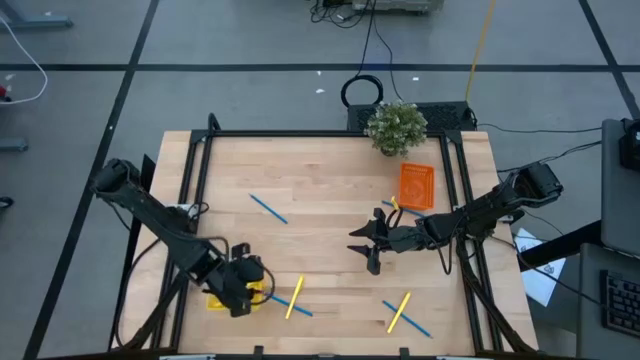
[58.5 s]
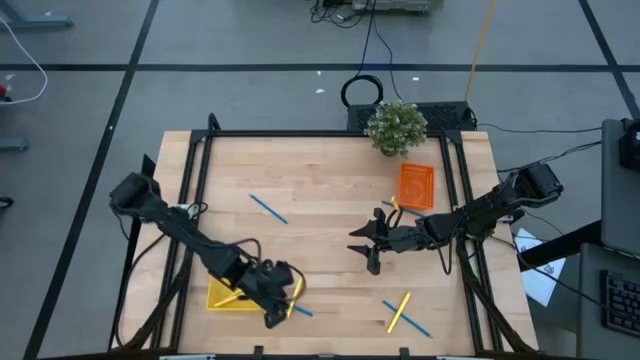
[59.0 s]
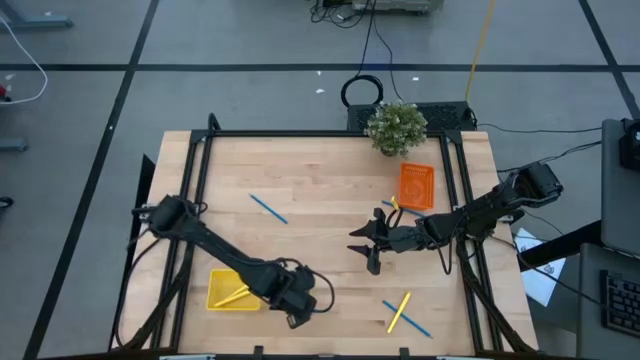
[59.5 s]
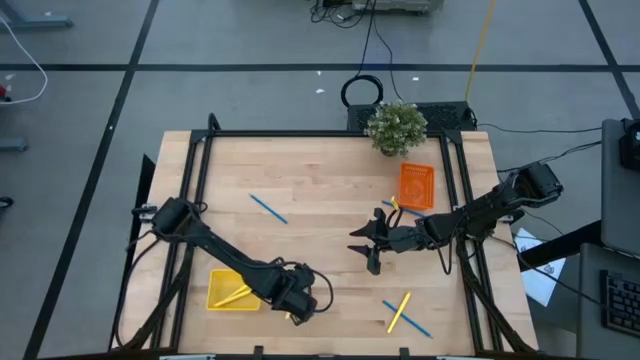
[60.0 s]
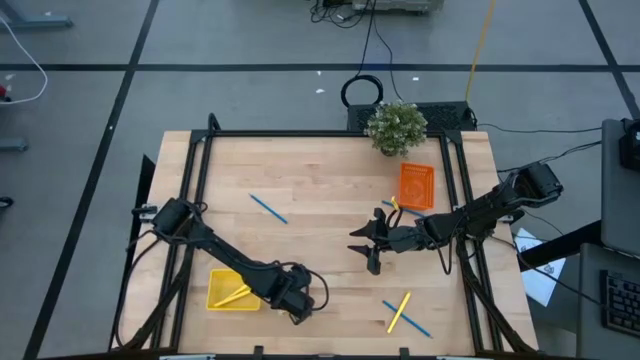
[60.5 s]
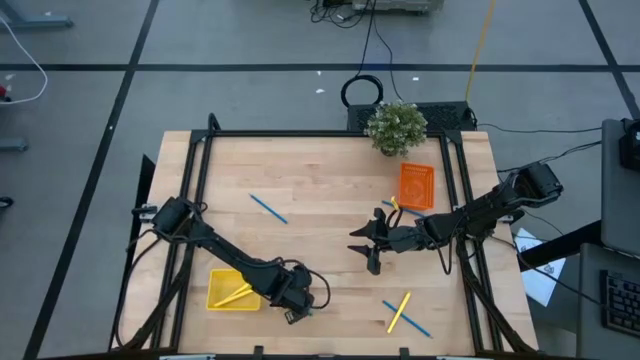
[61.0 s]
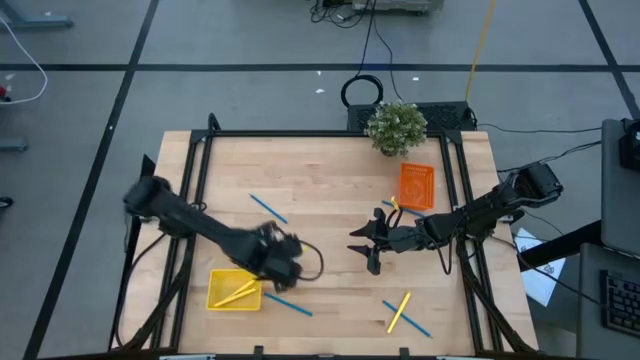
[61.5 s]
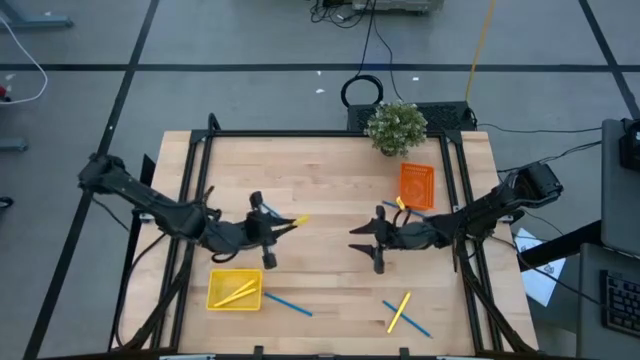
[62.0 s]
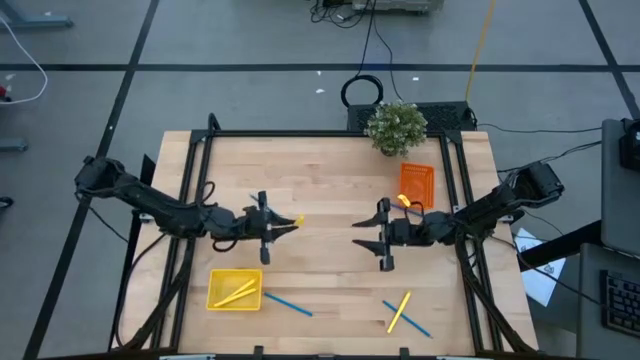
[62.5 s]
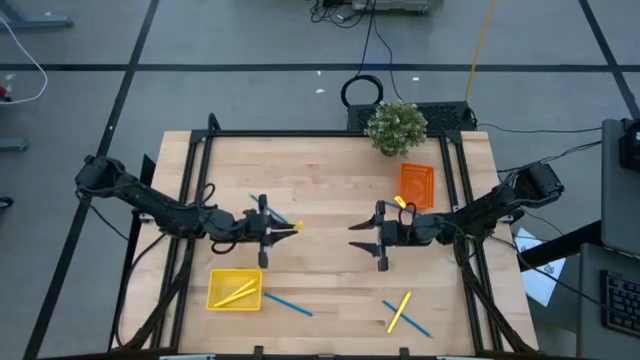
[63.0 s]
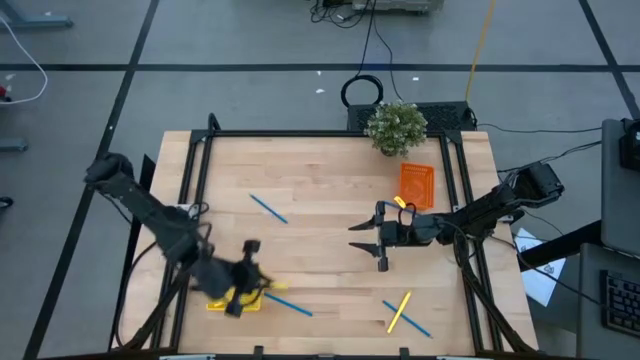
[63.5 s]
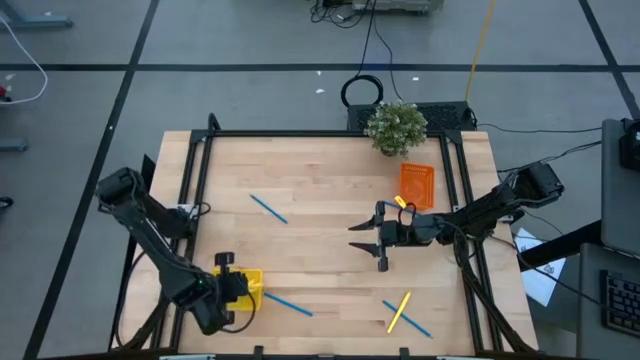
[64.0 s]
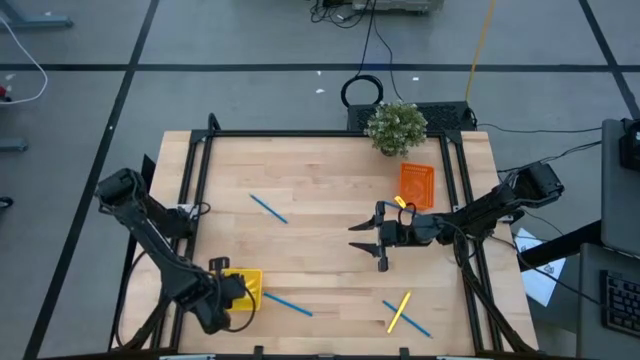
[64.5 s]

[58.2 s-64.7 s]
Task: Sort pens & pencils
Put the left yellow ballpen into the yellow bin

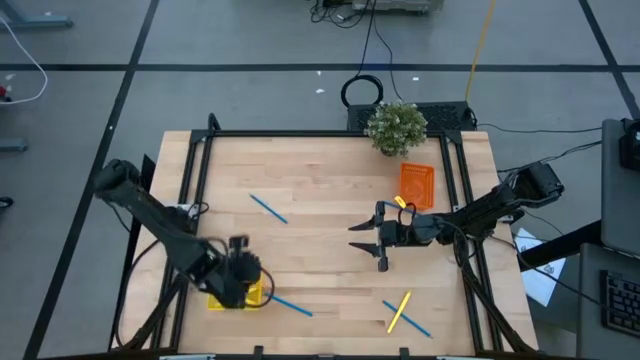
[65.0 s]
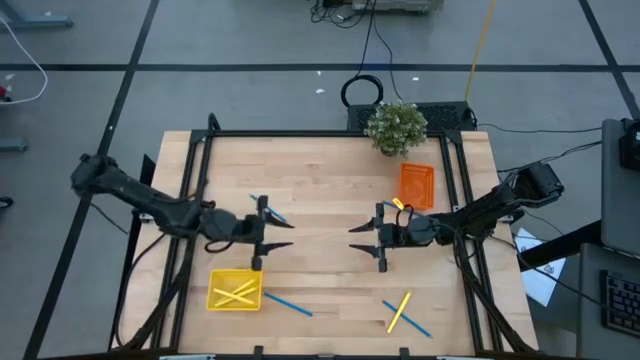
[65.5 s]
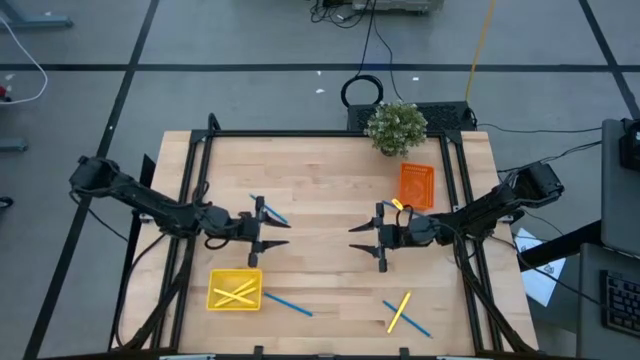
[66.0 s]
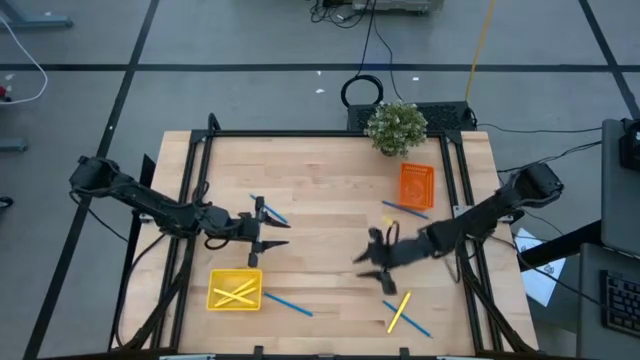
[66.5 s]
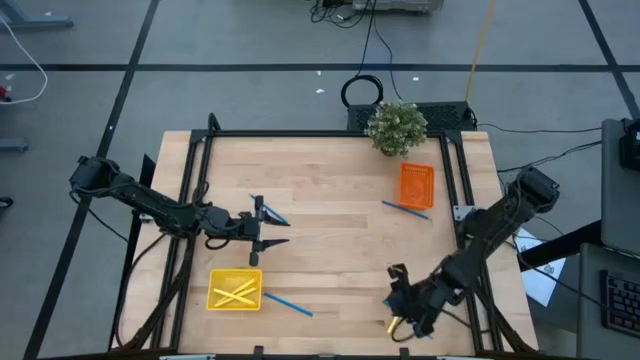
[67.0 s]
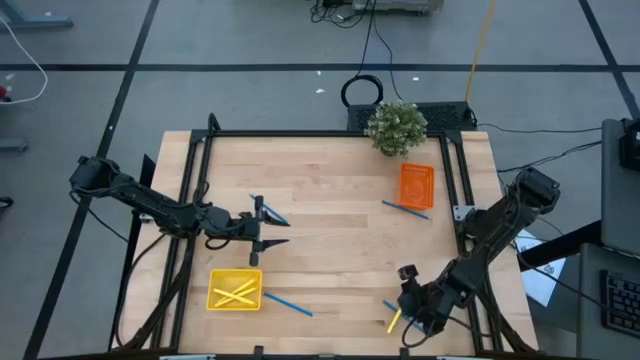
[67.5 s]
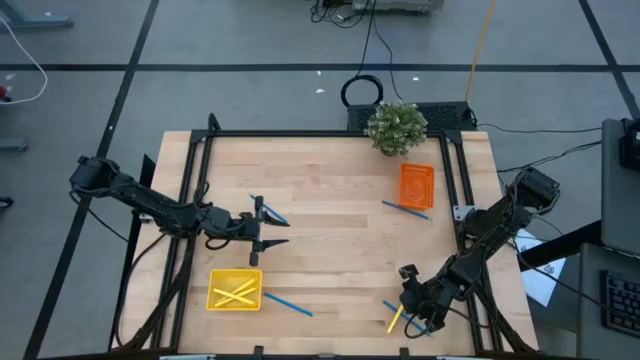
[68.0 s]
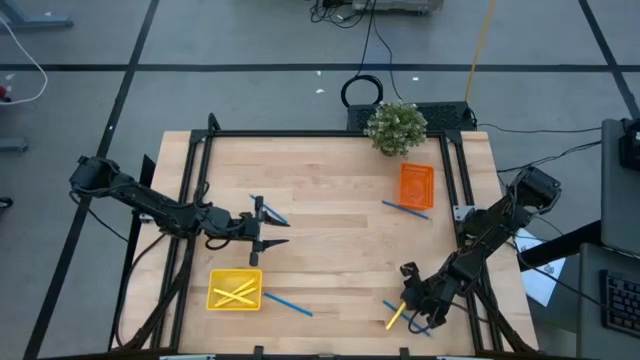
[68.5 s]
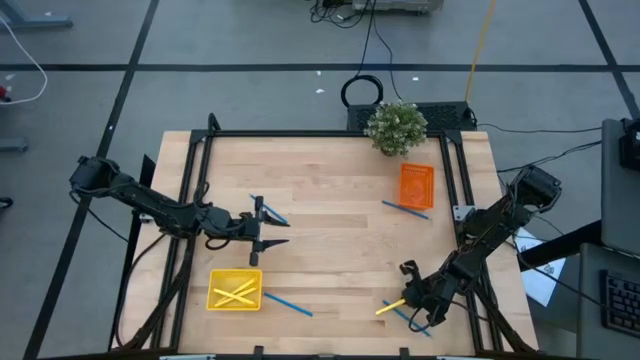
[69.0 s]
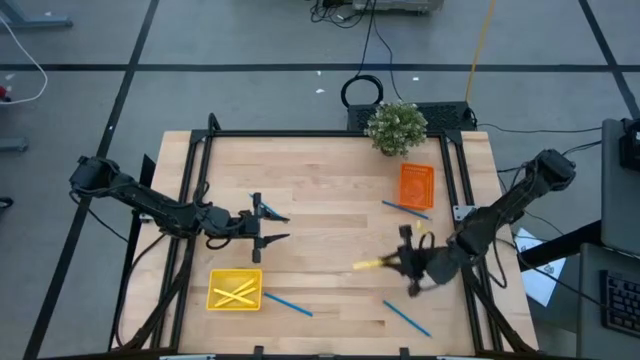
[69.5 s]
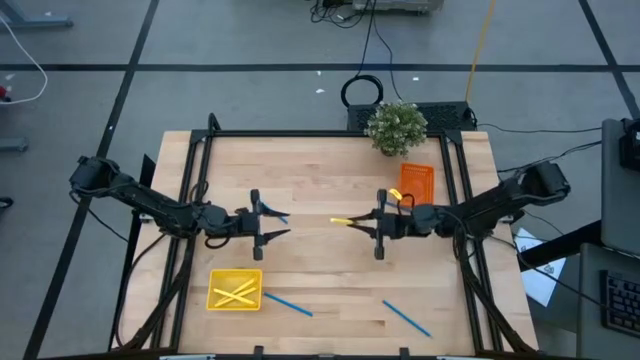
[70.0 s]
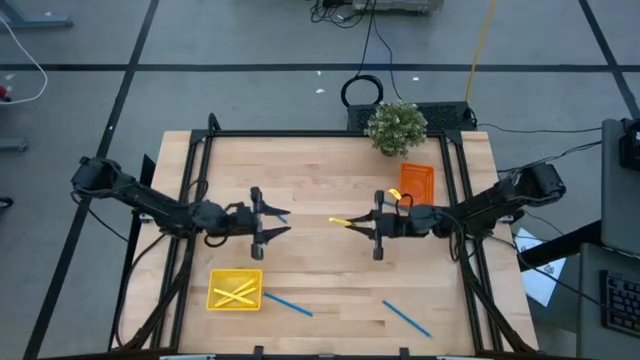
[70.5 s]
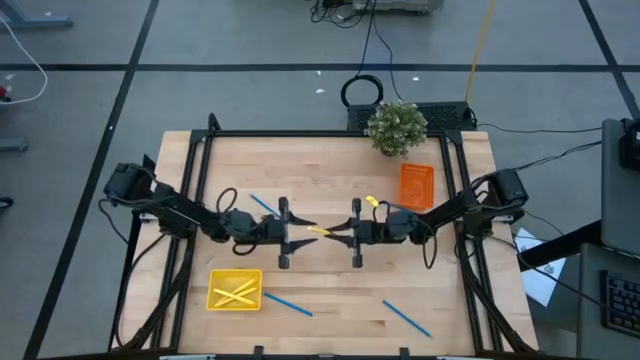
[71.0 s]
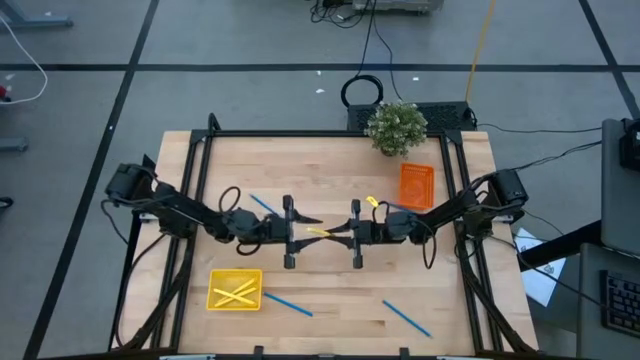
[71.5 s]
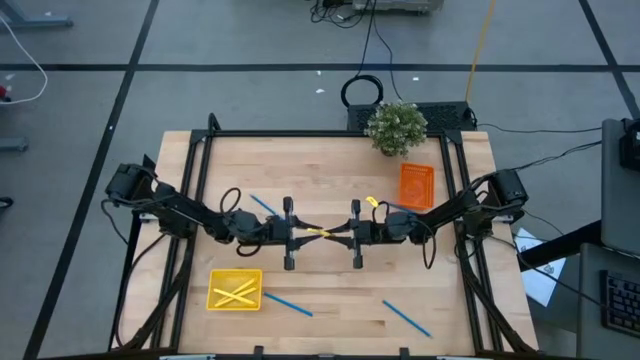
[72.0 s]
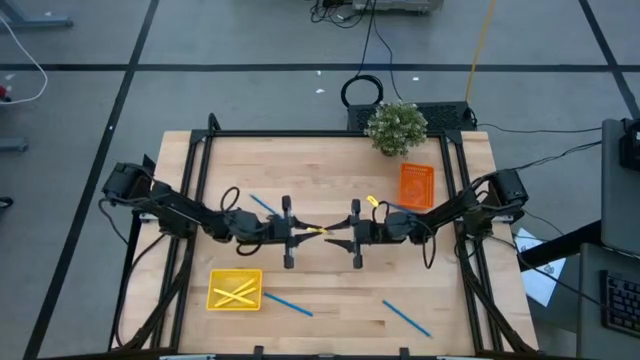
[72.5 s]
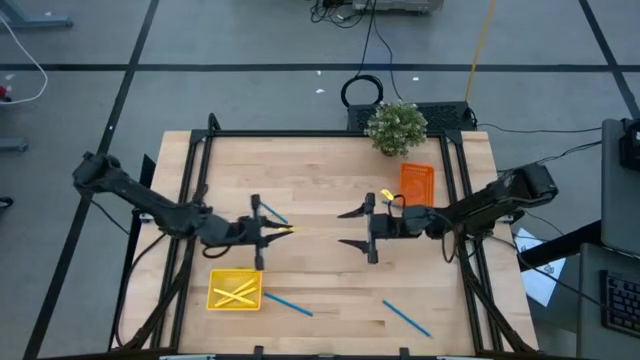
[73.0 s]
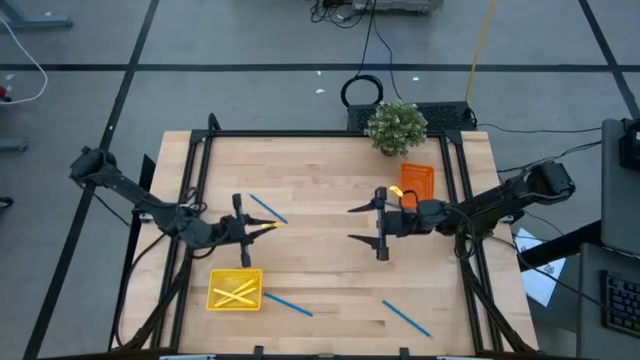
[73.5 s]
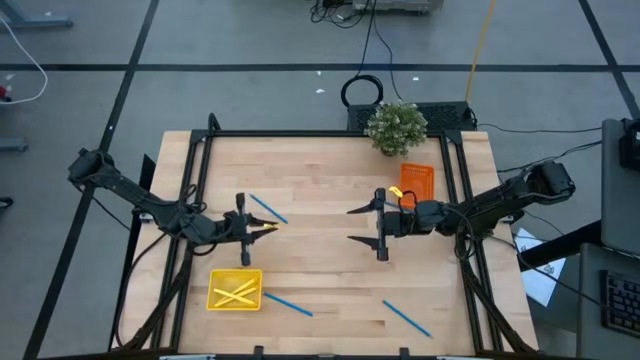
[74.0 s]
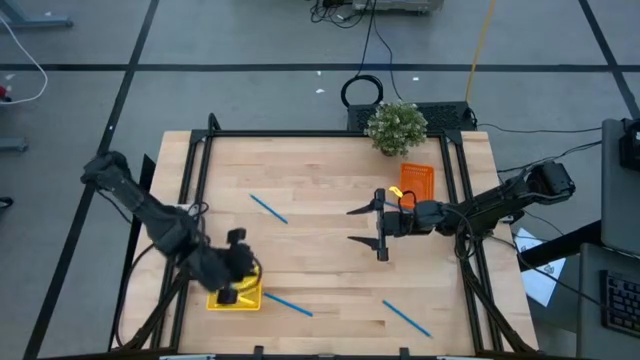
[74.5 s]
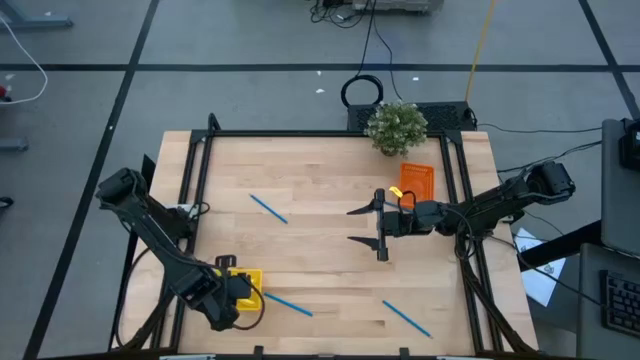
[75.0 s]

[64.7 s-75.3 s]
Put the yellow ballpen into the yellow bin

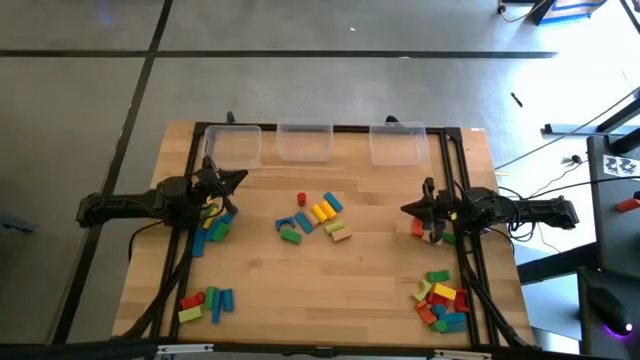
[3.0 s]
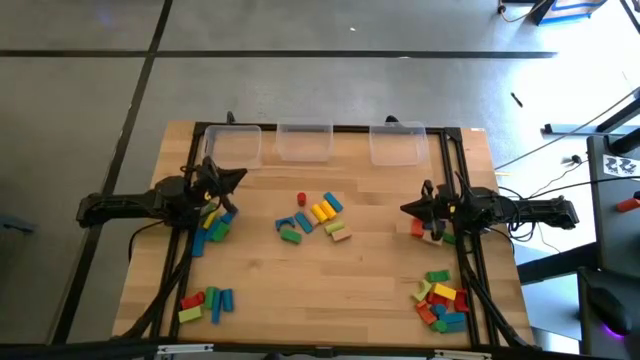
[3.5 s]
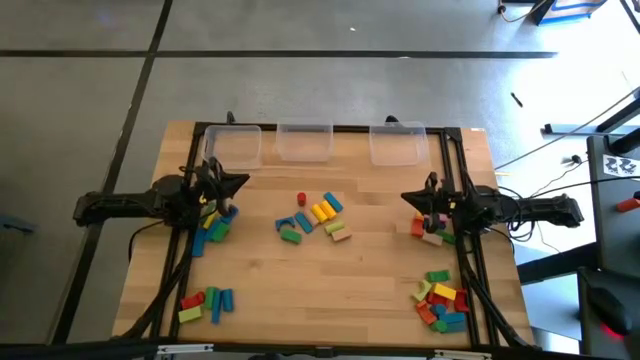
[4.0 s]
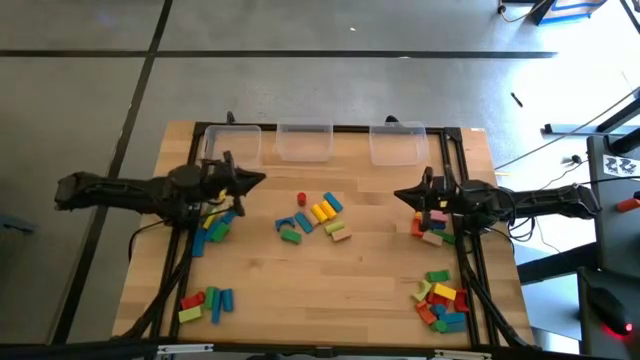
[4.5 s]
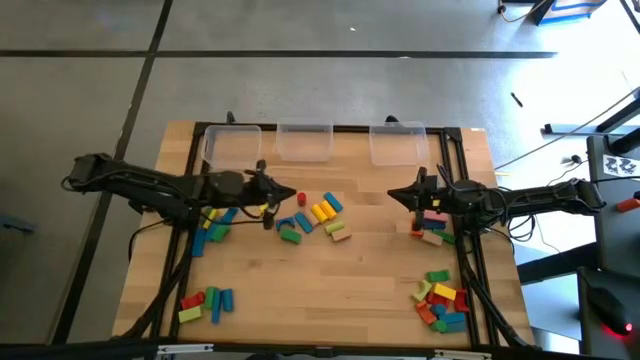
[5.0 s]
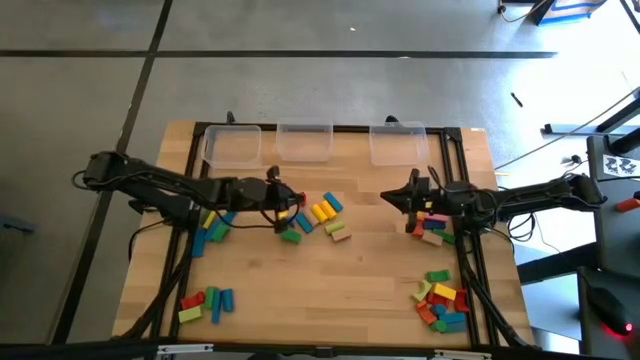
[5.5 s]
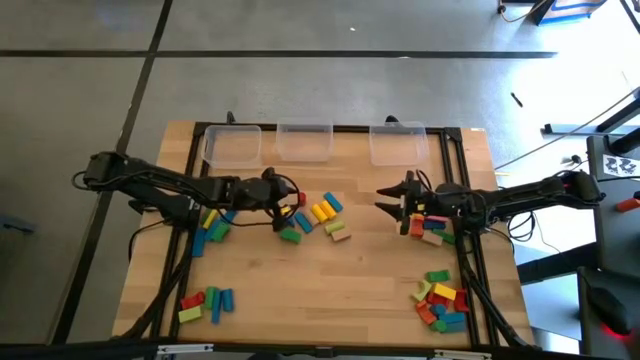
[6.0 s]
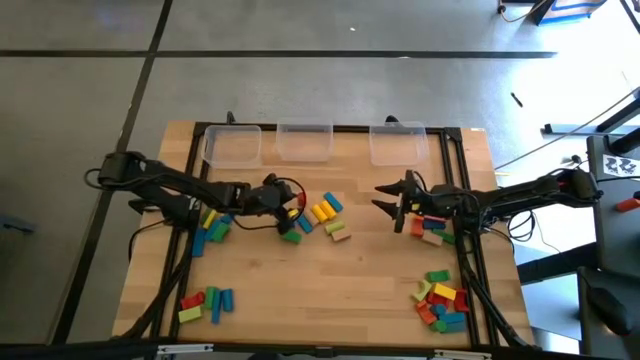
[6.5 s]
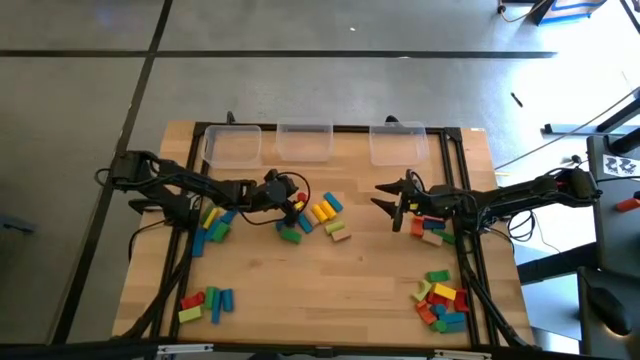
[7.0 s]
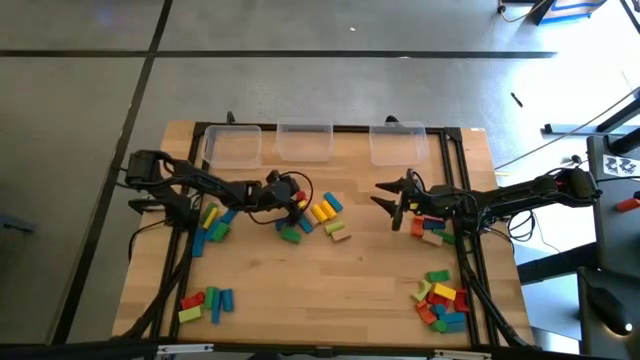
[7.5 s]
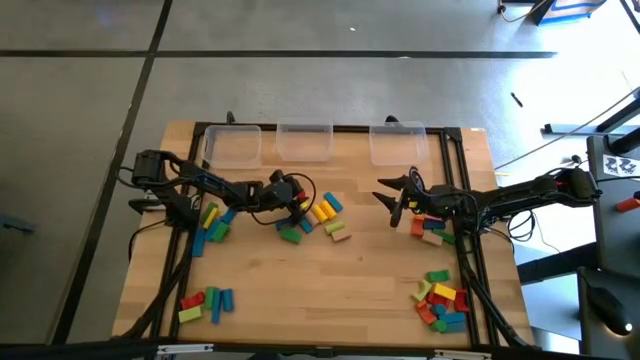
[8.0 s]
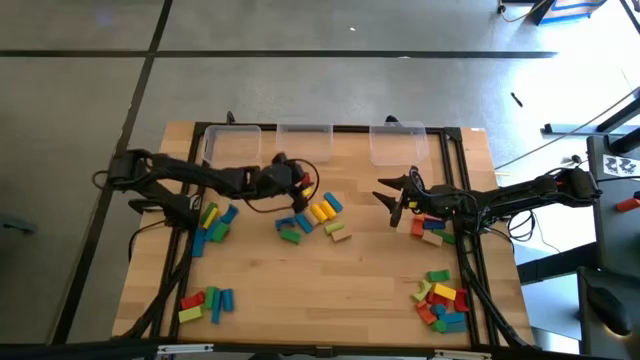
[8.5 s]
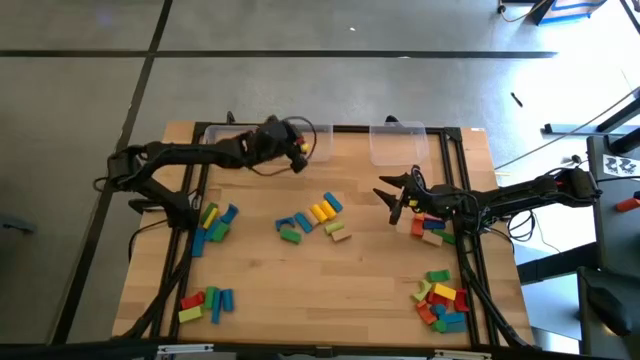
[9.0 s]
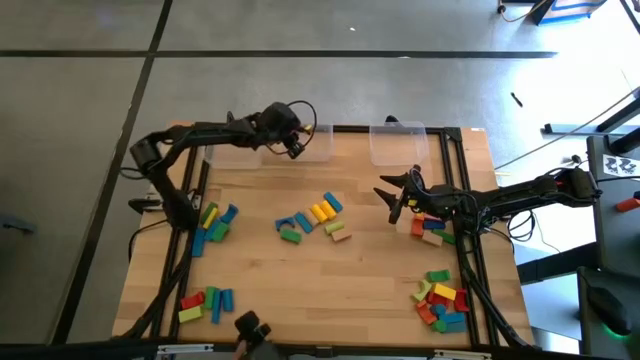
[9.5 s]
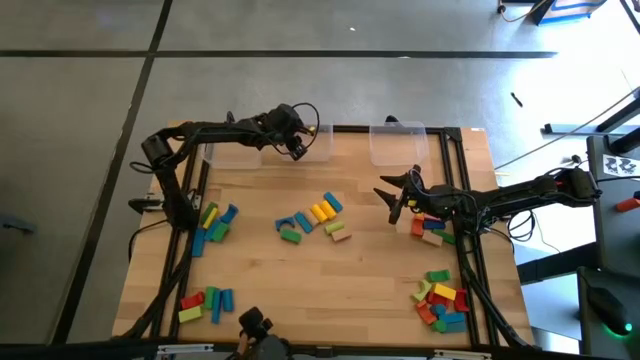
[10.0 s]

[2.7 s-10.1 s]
Task: Sort blocks by size
Put the red cylindrical block into the middle transparent bin
